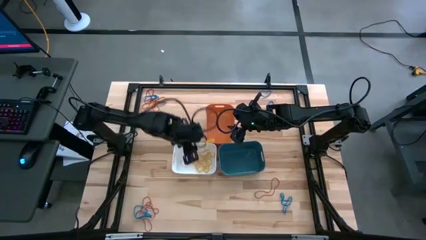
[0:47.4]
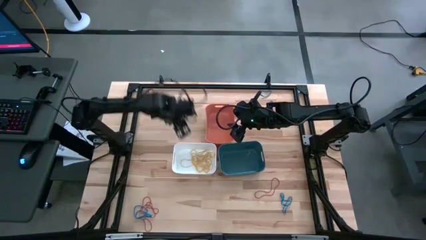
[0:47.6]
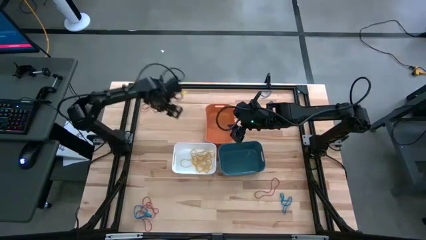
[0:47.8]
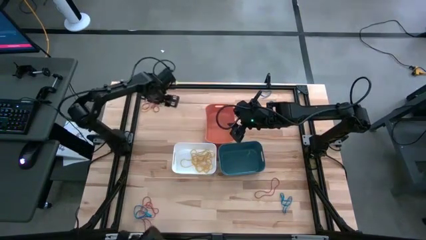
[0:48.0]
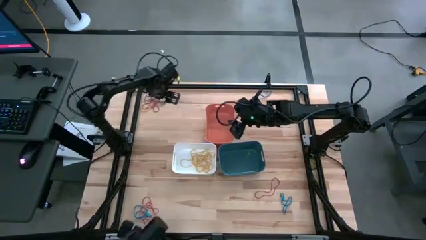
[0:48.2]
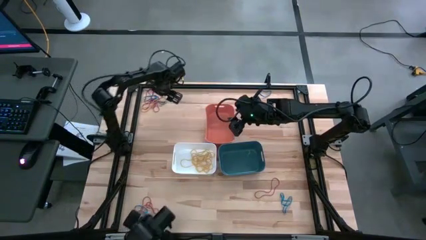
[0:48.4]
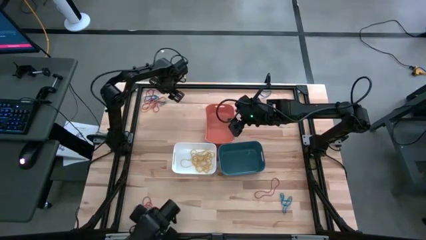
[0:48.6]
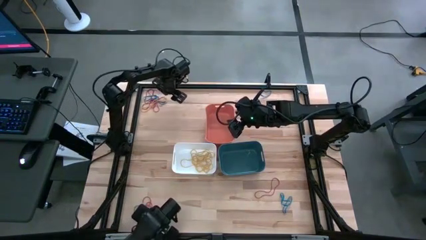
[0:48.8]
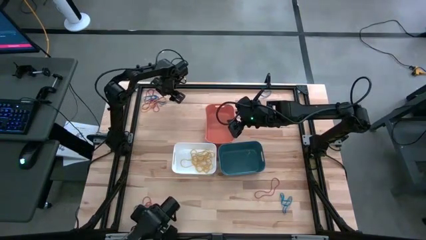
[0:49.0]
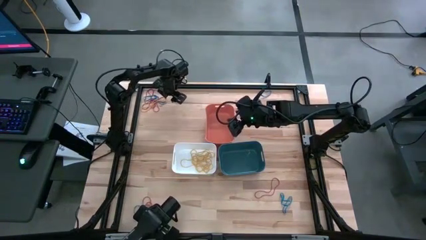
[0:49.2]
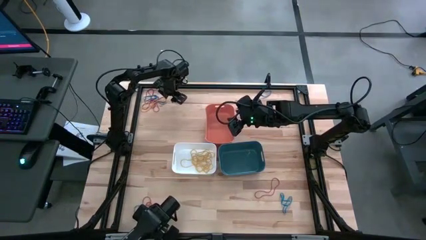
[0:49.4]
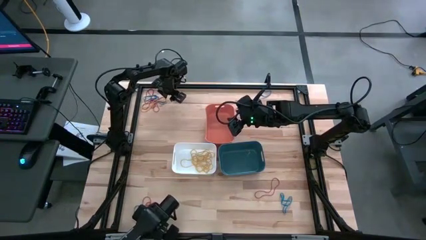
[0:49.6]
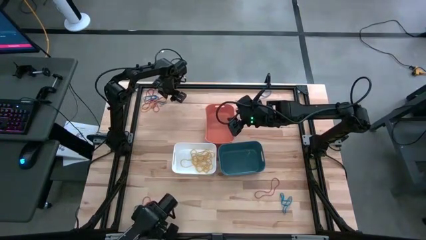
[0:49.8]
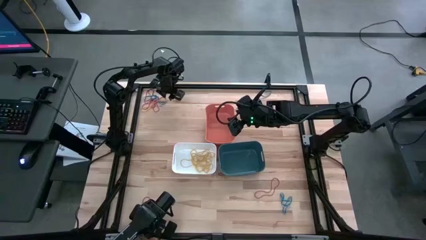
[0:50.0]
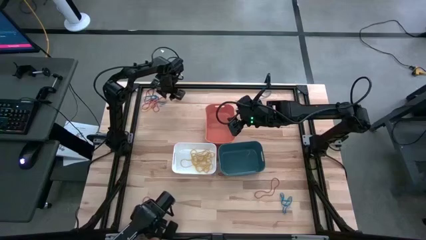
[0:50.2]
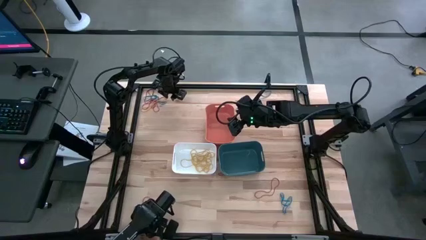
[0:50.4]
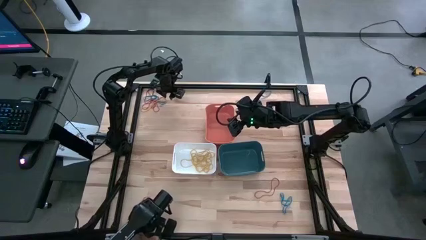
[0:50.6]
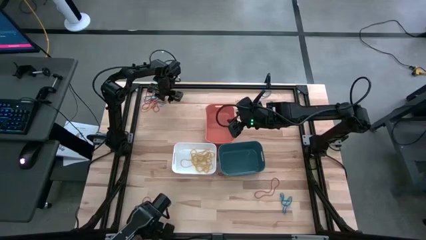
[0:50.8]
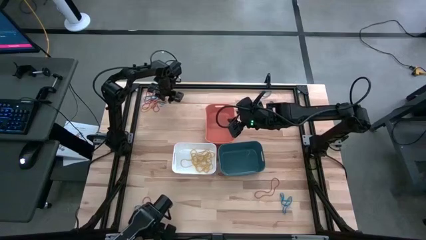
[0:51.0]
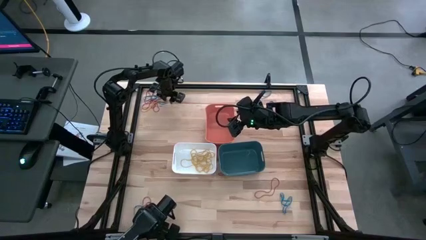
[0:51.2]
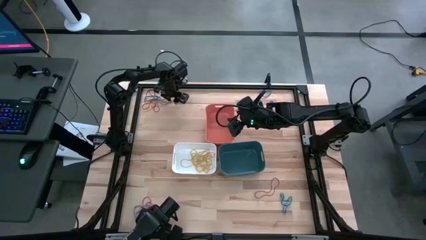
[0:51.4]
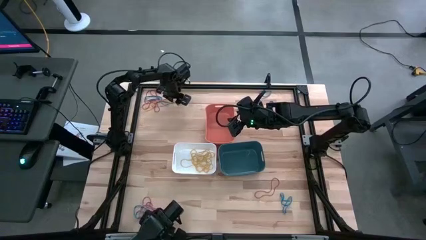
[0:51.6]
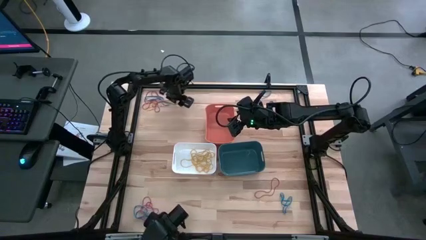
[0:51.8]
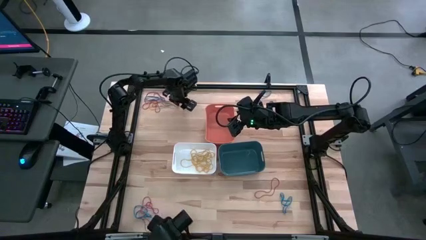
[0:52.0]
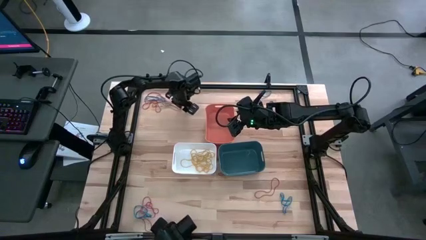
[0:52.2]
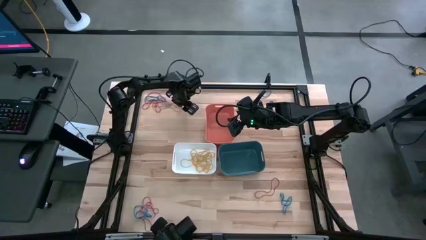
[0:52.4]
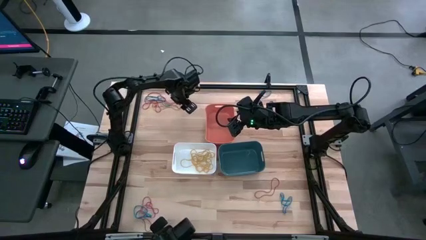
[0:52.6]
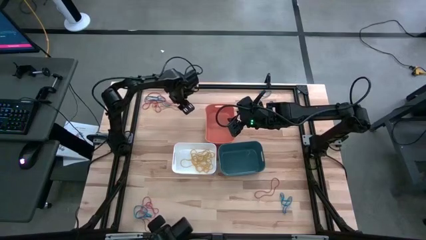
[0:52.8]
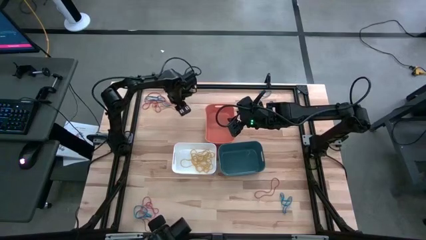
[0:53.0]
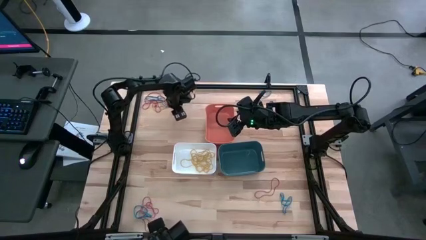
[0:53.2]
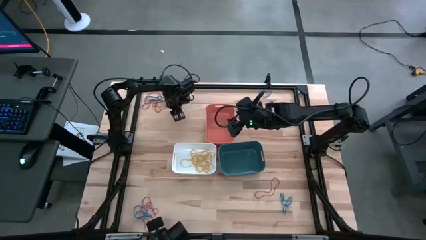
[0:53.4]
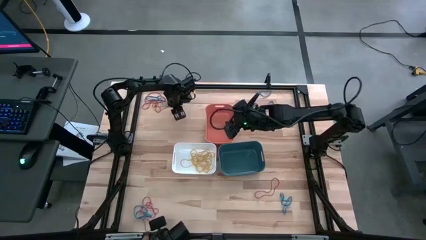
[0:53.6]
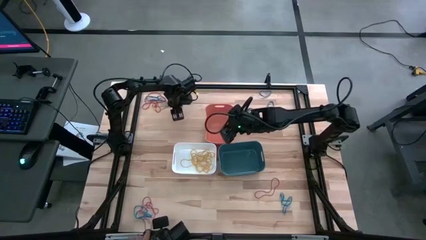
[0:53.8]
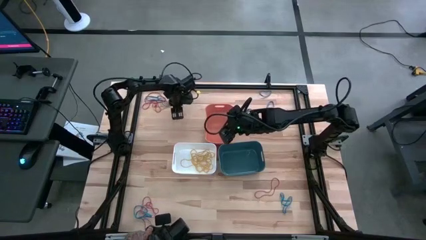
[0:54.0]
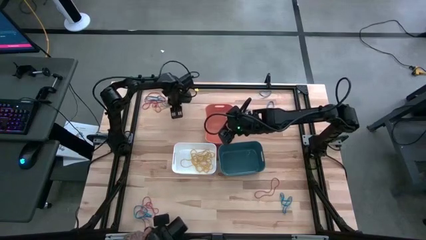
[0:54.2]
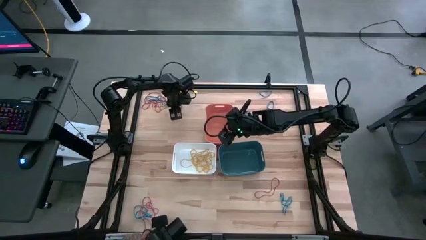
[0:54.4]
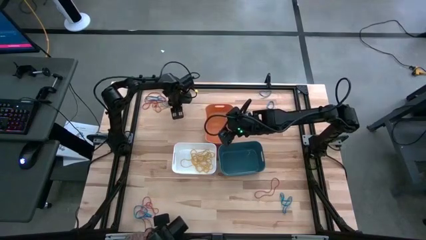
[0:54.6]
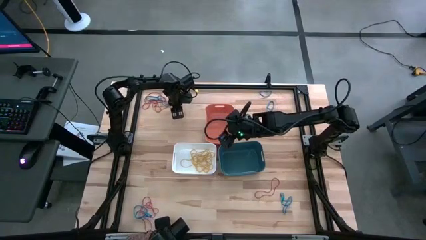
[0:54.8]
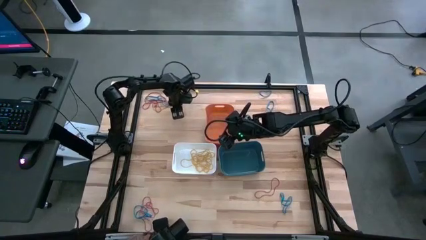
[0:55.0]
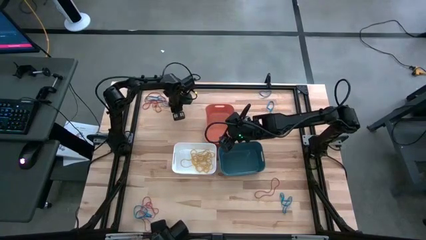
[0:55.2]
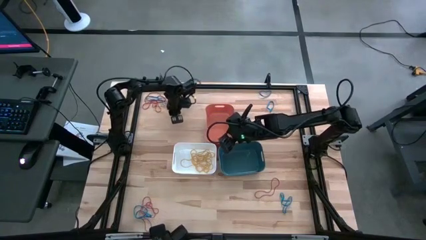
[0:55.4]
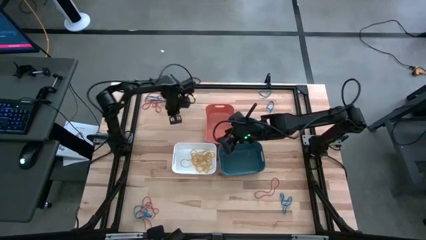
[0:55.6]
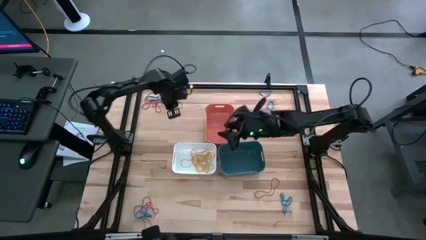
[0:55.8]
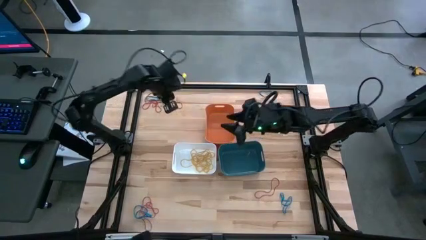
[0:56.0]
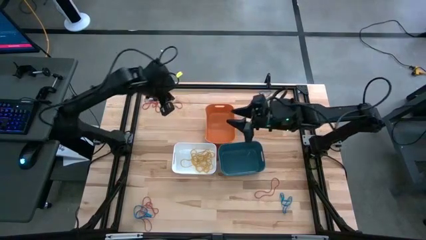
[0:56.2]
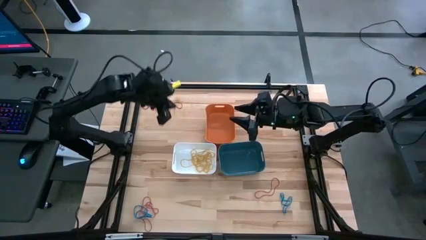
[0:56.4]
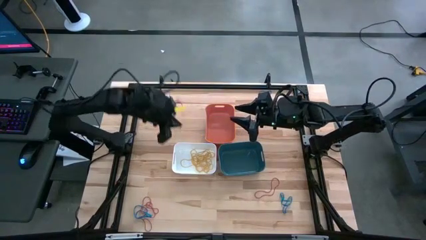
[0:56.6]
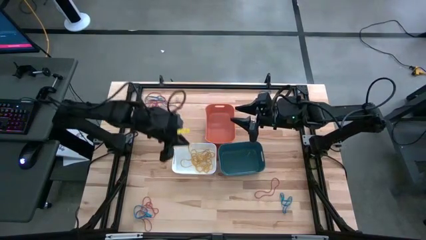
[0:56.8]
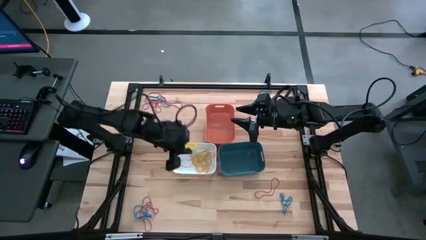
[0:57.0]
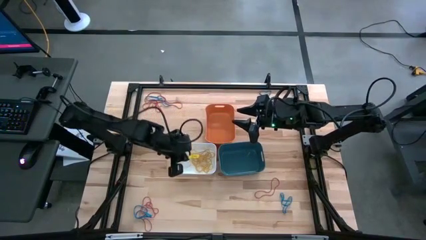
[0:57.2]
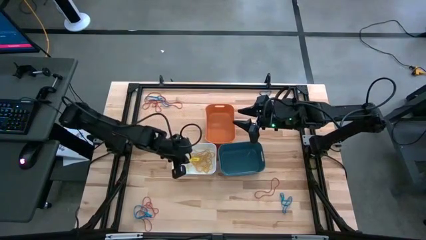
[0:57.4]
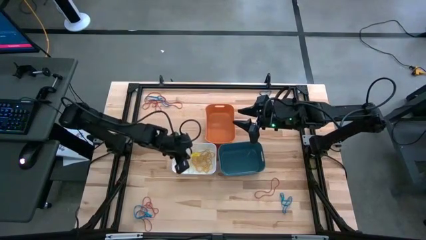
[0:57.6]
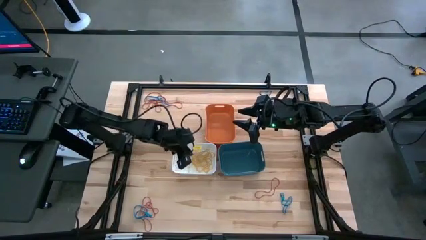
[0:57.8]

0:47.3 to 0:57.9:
Task: Sort rubber bands into baskets
Put the yellow rubber band into the white bin

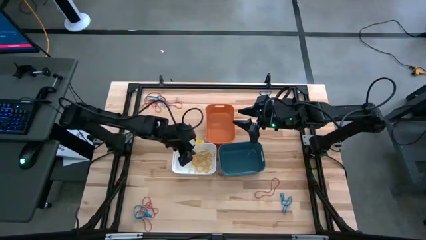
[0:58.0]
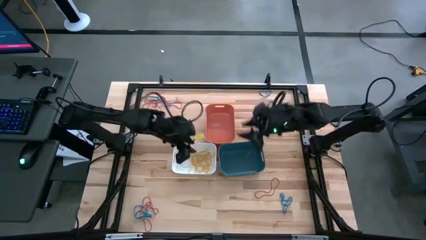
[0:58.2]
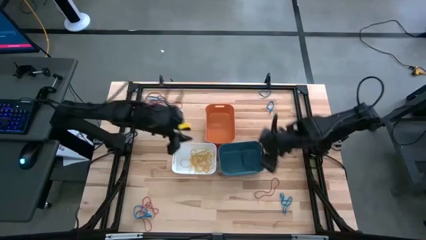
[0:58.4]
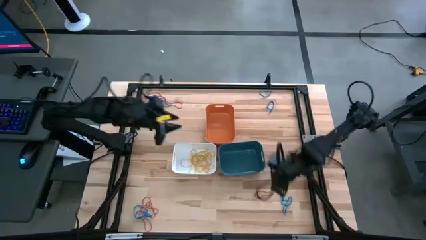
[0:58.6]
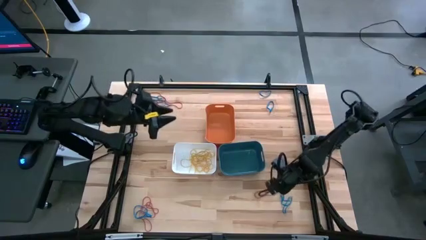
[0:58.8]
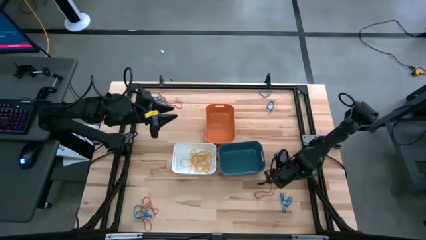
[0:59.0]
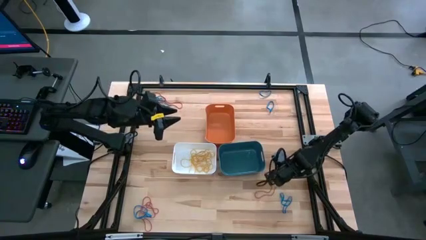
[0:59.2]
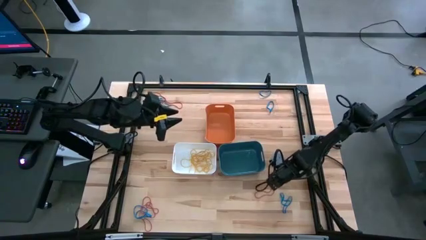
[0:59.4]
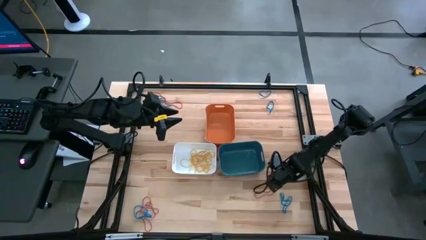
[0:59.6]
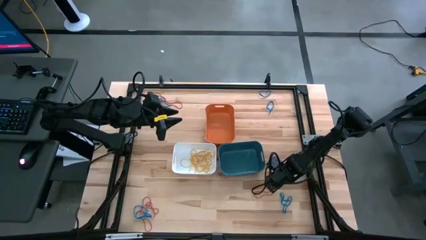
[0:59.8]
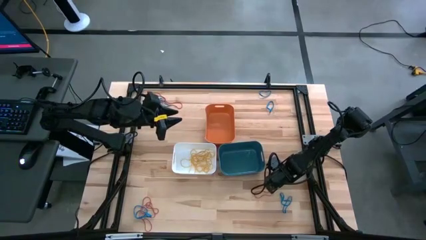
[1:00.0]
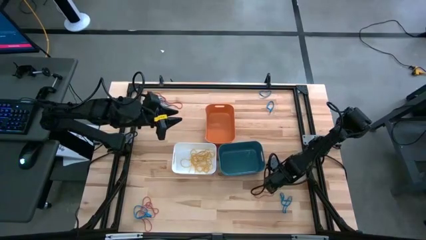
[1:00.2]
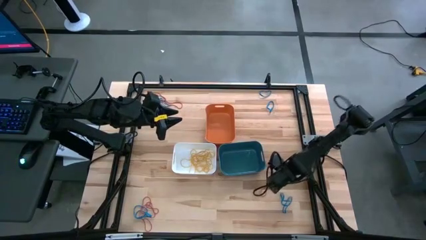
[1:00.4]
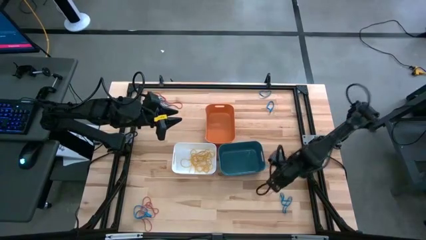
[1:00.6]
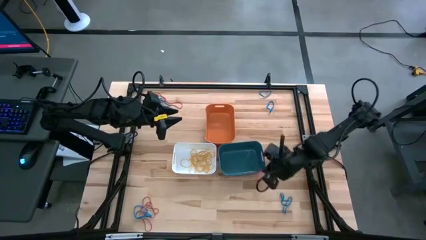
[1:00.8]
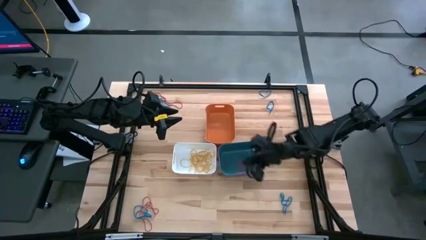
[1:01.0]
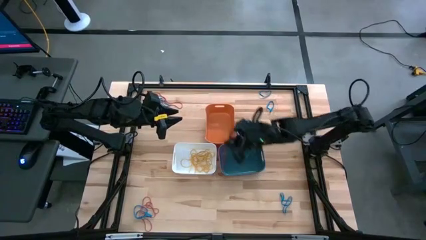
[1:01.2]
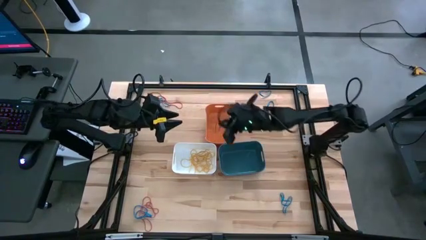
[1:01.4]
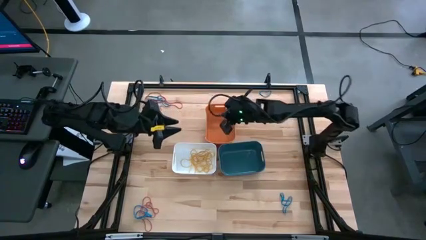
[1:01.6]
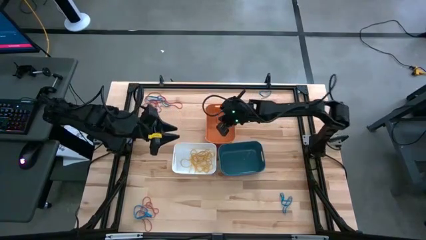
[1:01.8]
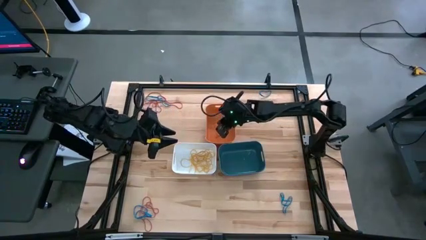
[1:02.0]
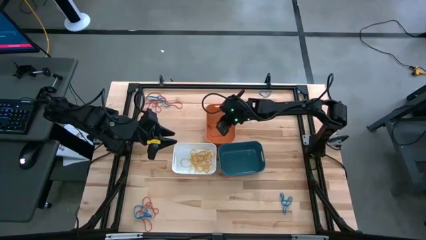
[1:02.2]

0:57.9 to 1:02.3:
Put the red rubber band into the orange bin
